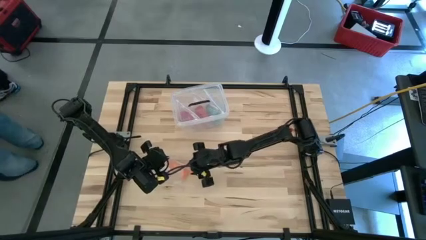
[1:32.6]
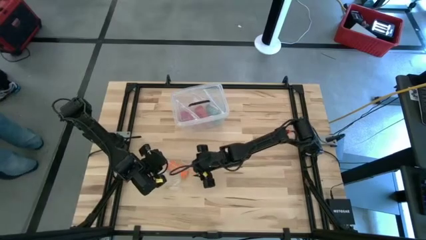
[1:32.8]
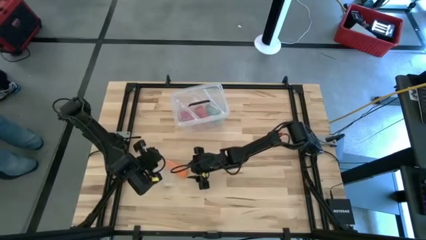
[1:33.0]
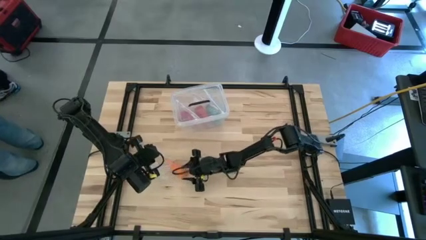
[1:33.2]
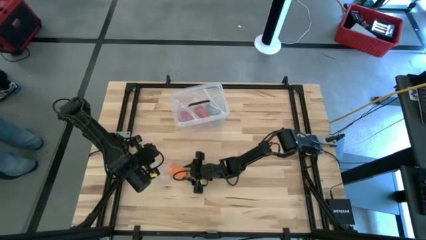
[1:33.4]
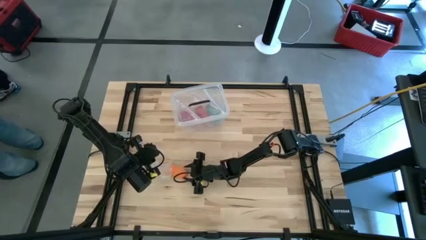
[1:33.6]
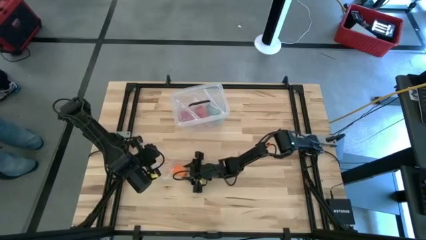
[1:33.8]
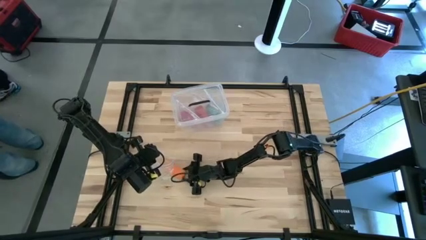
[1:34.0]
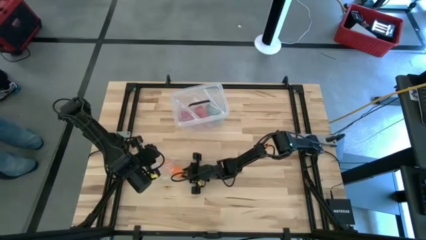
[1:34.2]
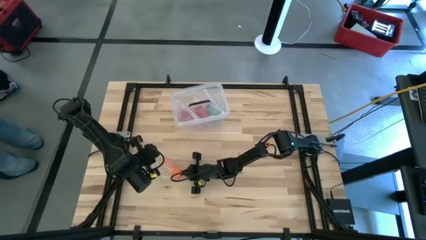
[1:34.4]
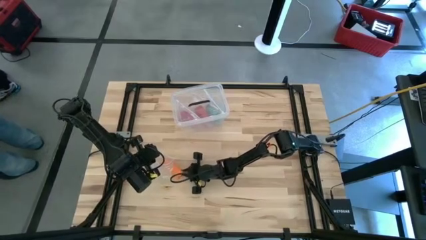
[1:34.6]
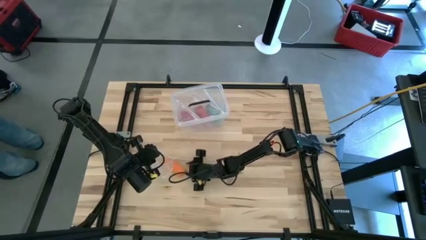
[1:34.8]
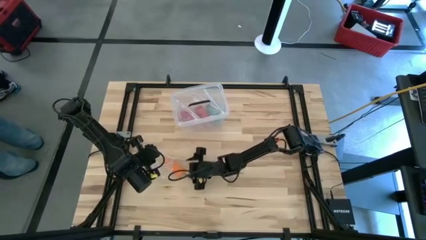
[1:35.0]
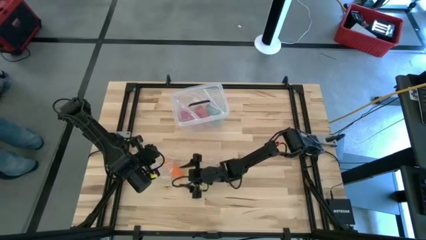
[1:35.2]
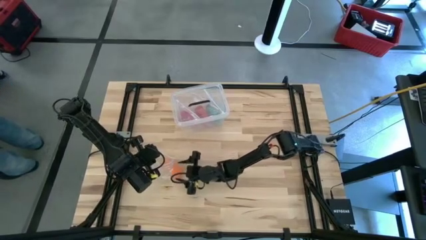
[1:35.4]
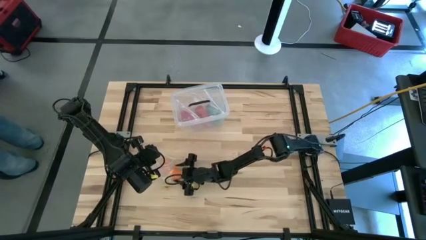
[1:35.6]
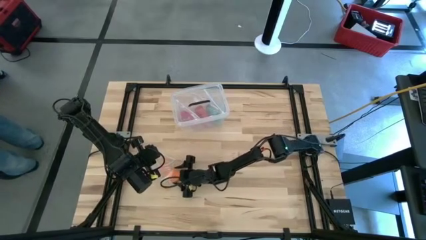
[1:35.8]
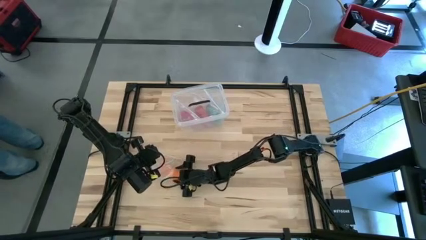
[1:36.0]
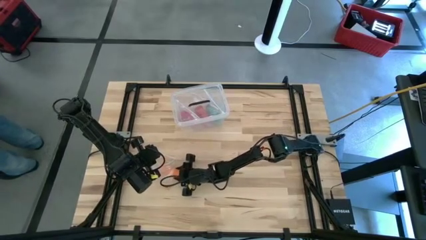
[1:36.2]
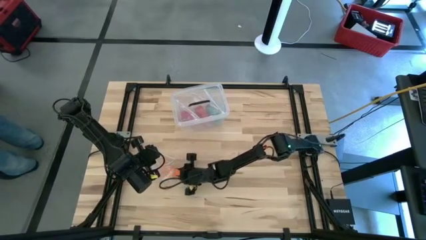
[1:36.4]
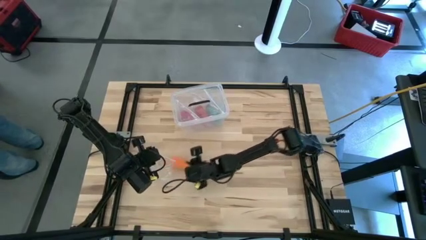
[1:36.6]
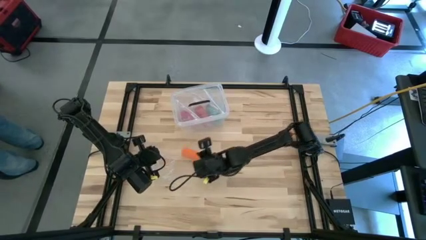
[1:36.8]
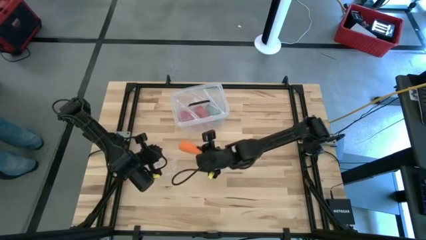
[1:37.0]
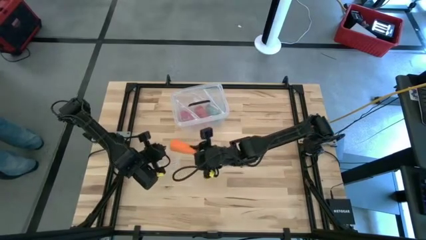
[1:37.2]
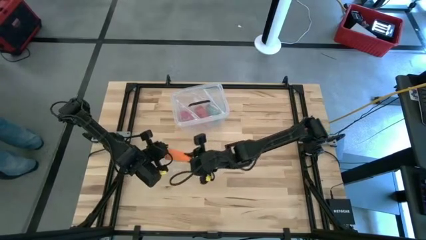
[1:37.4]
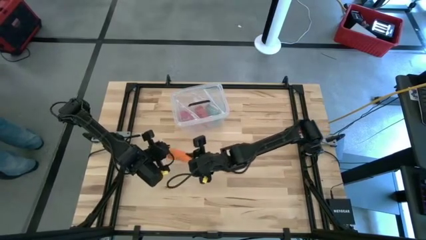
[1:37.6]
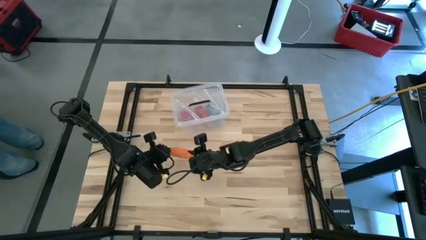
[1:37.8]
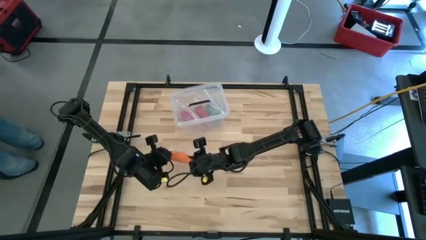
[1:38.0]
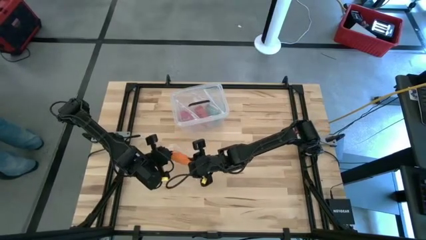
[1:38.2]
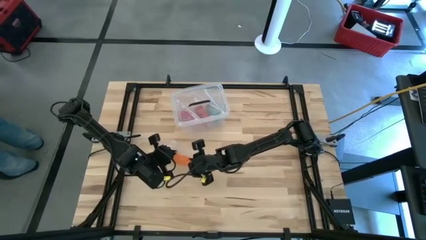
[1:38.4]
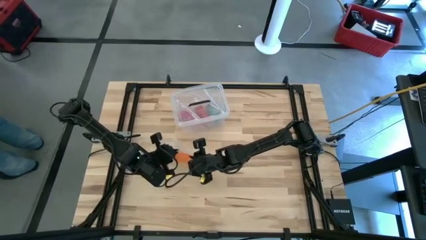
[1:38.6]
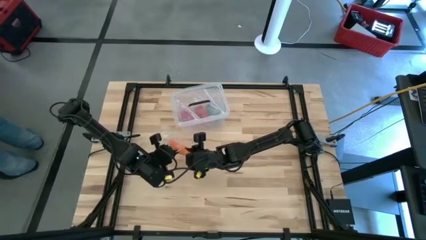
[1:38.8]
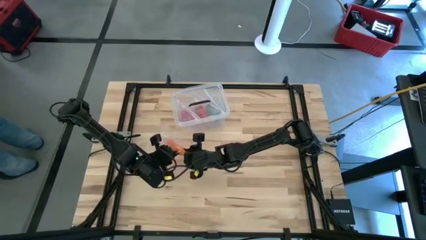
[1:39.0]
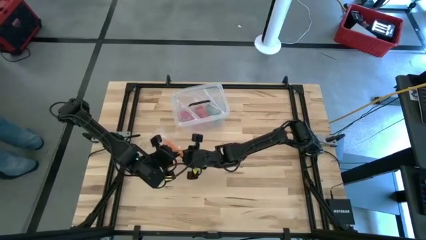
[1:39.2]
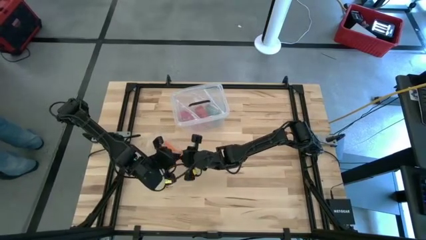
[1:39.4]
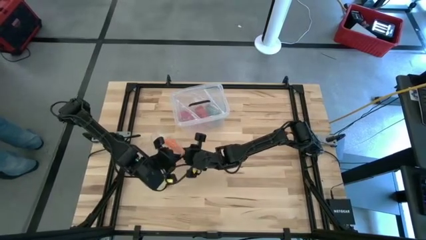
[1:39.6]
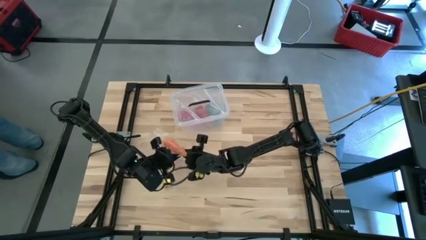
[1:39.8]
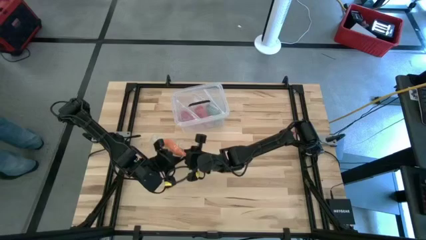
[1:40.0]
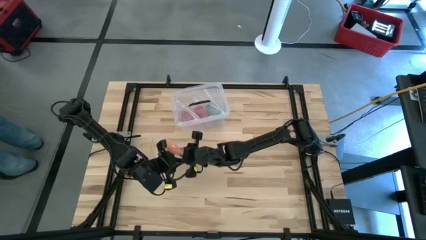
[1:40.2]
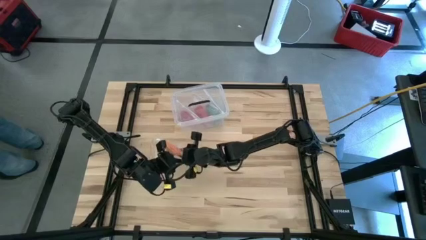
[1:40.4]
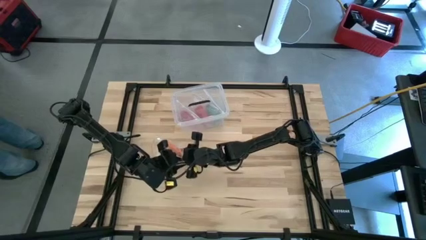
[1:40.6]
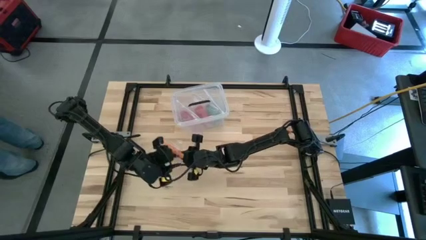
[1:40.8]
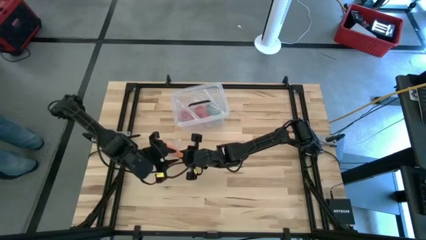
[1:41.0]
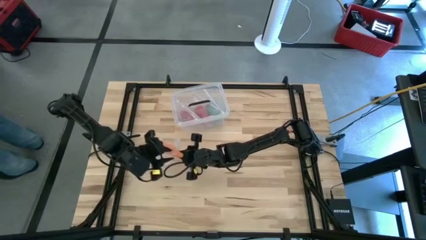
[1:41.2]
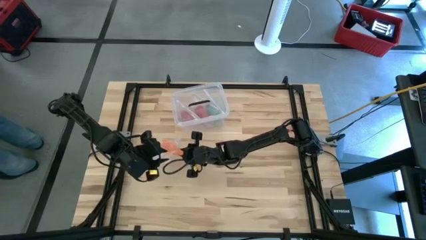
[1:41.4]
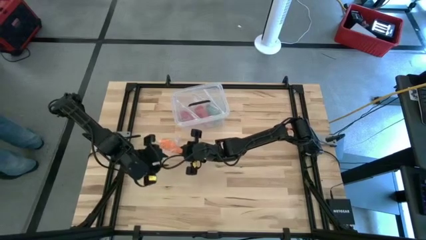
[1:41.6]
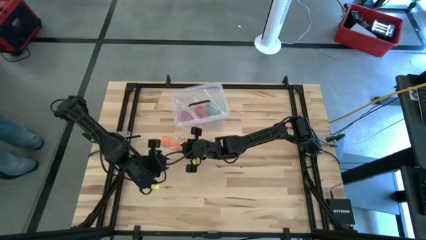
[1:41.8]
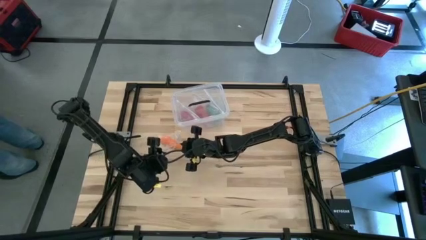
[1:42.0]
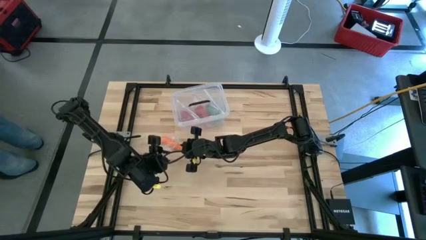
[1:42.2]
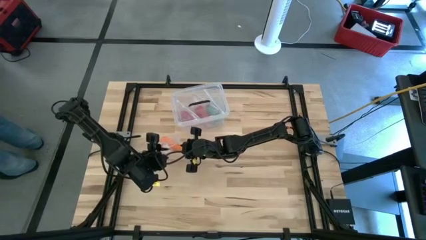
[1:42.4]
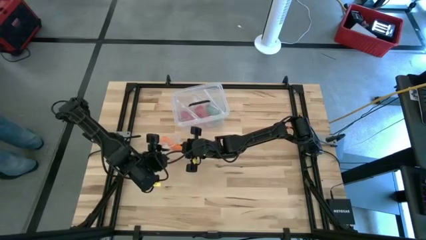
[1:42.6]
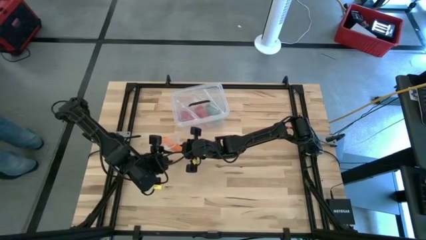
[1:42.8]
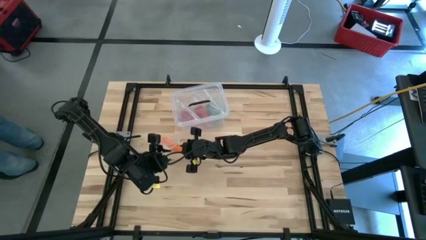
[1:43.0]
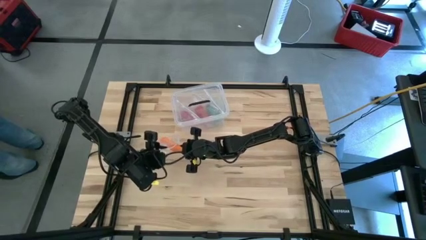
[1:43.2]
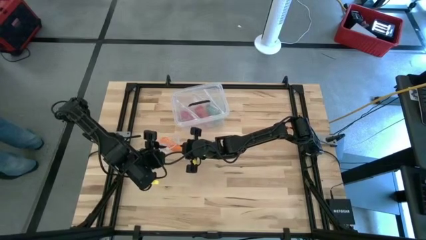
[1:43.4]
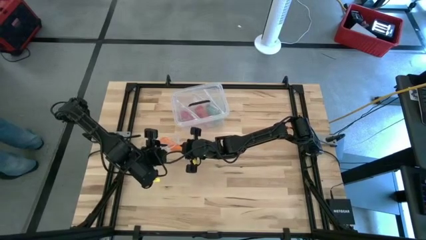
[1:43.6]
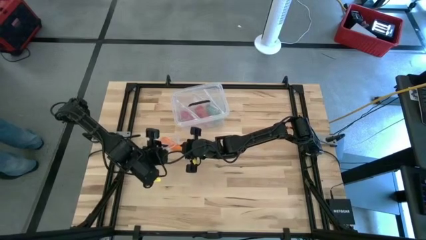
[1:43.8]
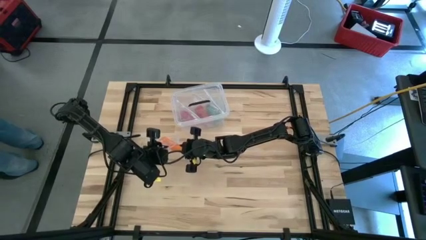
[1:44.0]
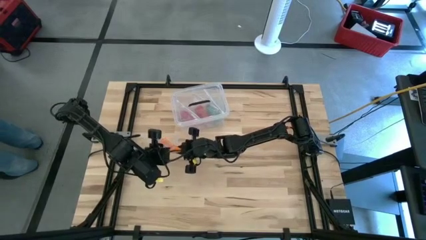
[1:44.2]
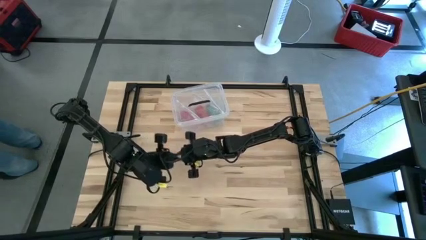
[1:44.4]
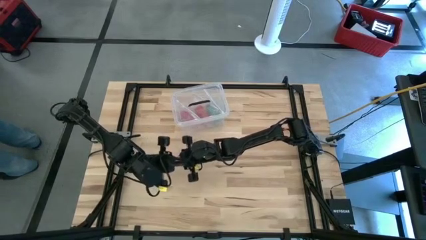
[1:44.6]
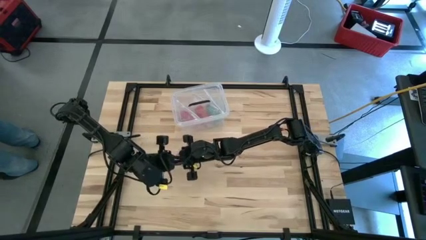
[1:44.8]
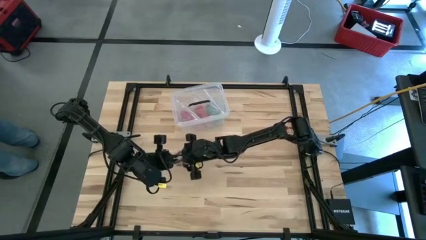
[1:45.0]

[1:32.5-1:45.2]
Task: Roll bandage
Put the rolled orange bandage into the transparent zip bag
